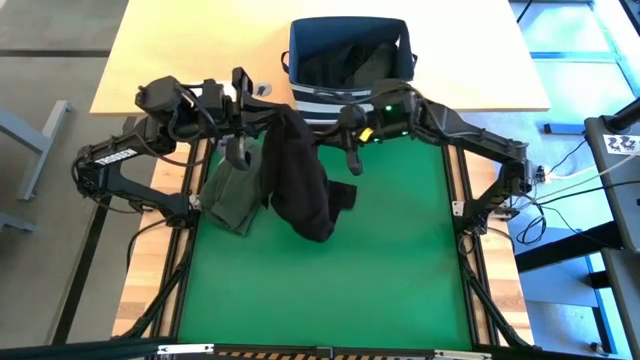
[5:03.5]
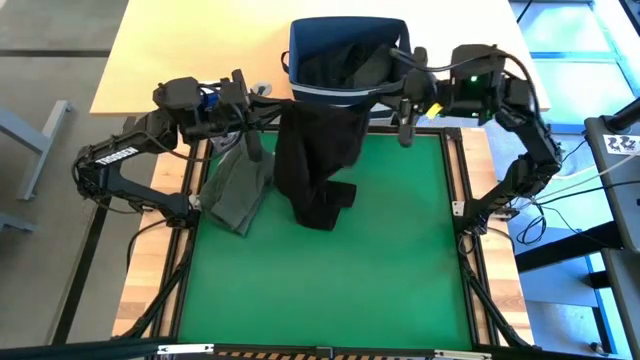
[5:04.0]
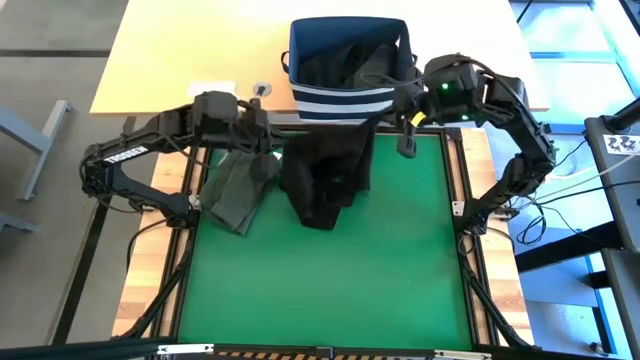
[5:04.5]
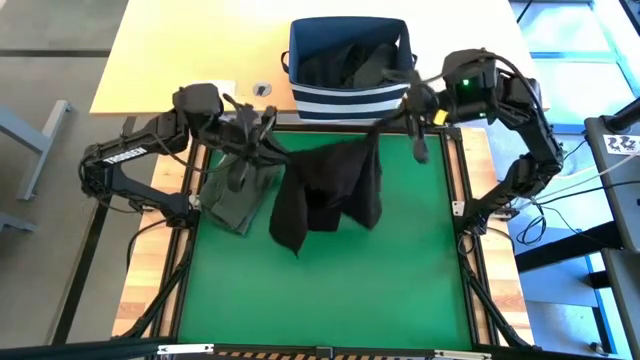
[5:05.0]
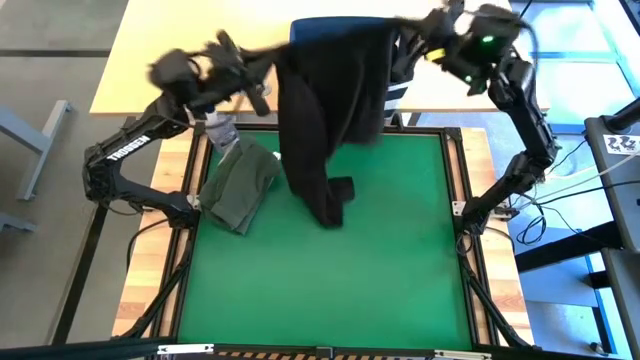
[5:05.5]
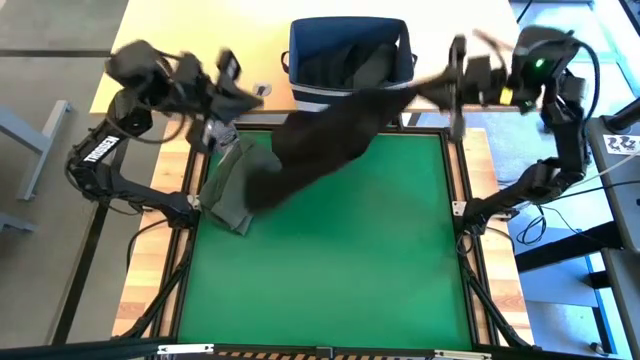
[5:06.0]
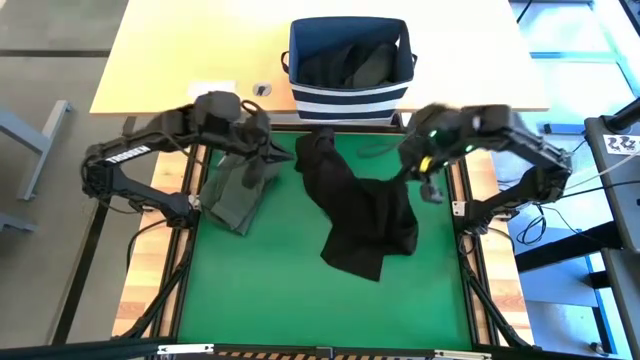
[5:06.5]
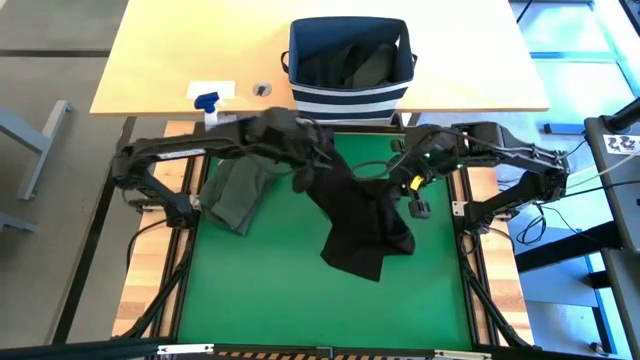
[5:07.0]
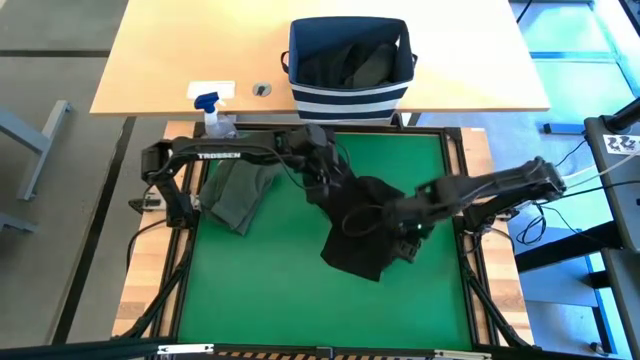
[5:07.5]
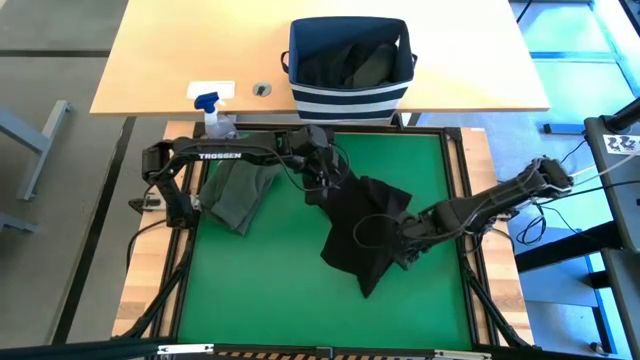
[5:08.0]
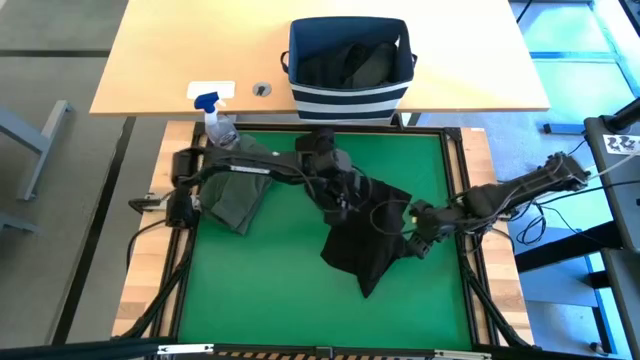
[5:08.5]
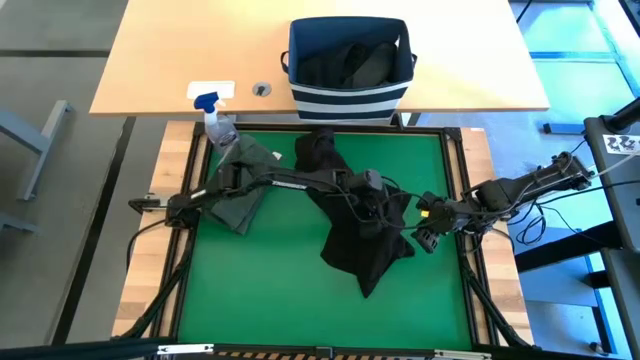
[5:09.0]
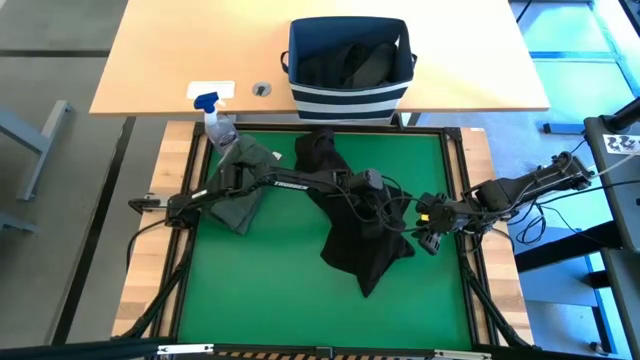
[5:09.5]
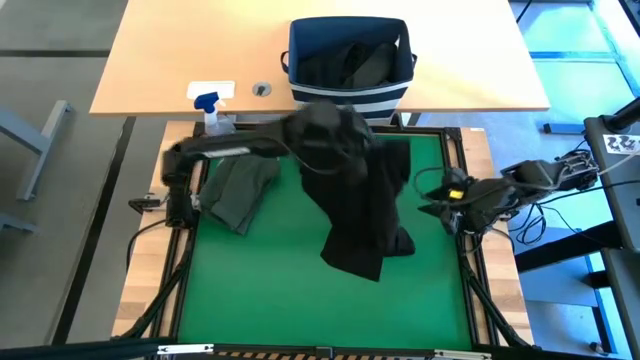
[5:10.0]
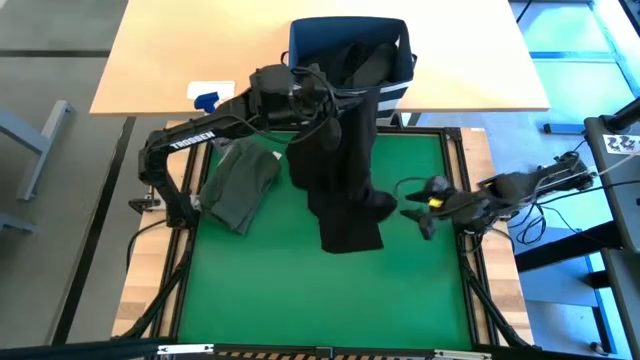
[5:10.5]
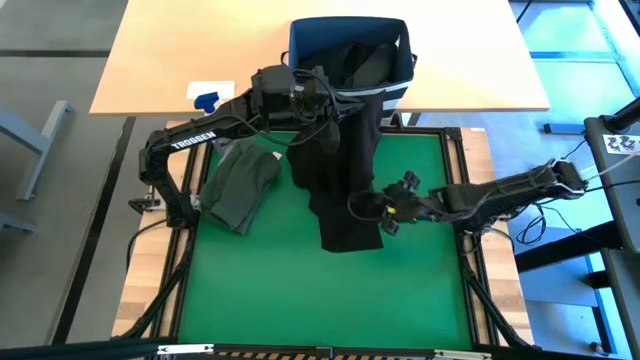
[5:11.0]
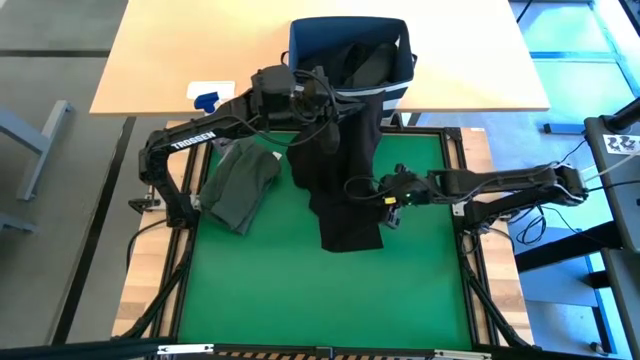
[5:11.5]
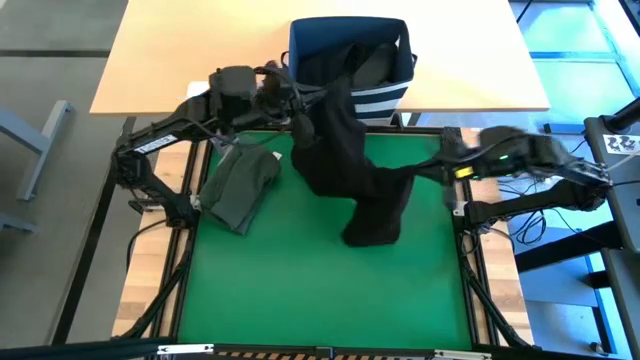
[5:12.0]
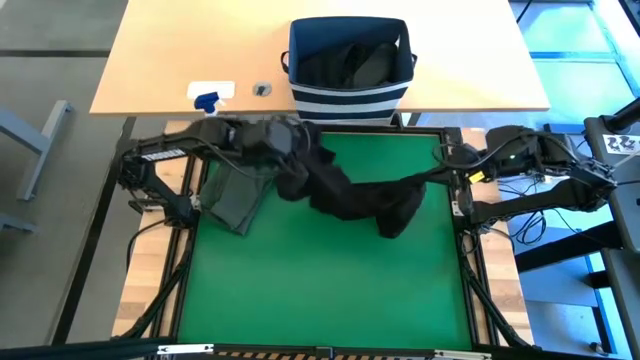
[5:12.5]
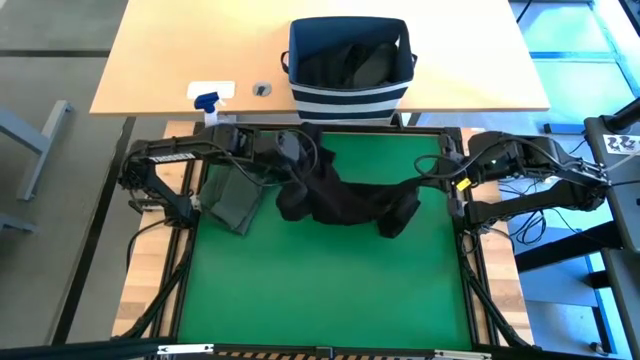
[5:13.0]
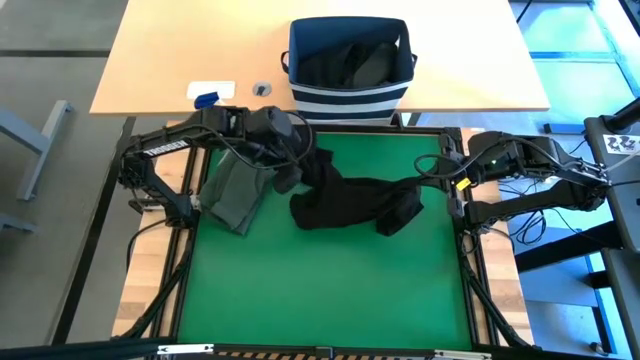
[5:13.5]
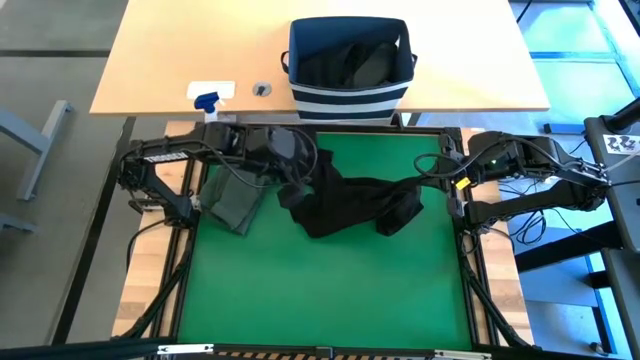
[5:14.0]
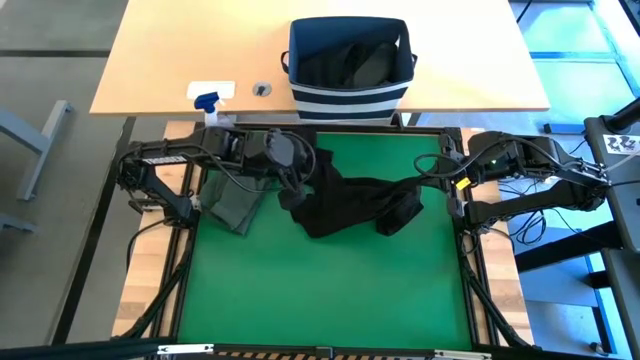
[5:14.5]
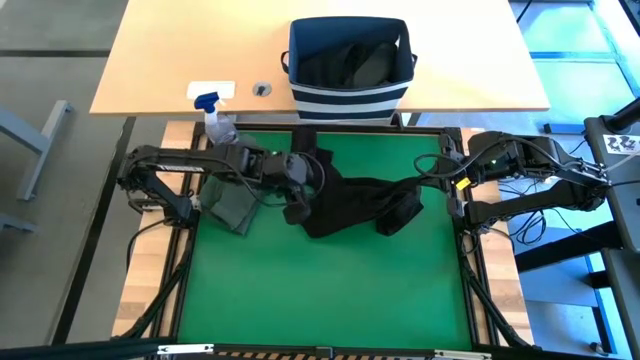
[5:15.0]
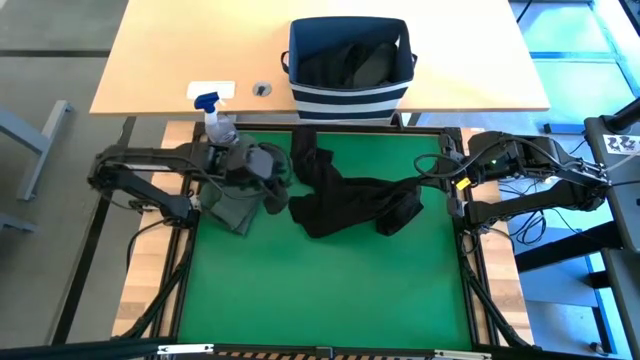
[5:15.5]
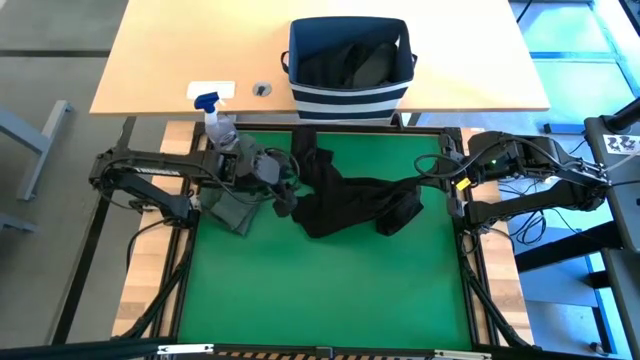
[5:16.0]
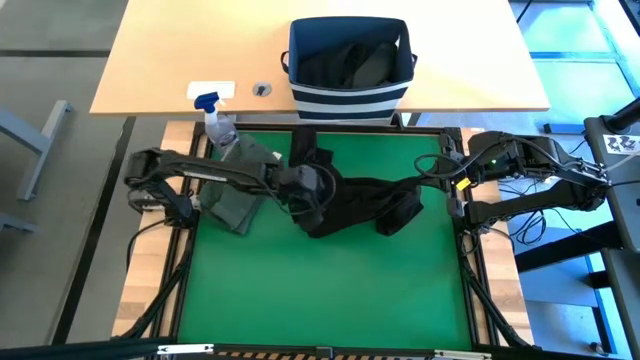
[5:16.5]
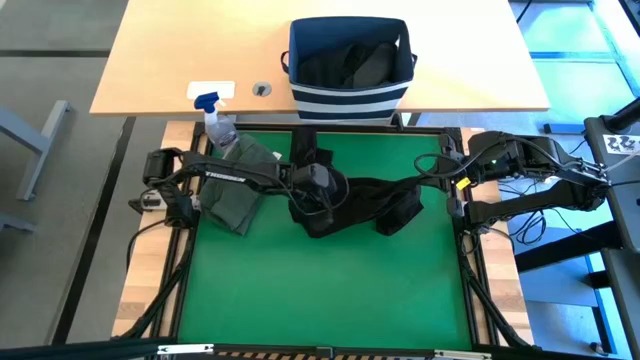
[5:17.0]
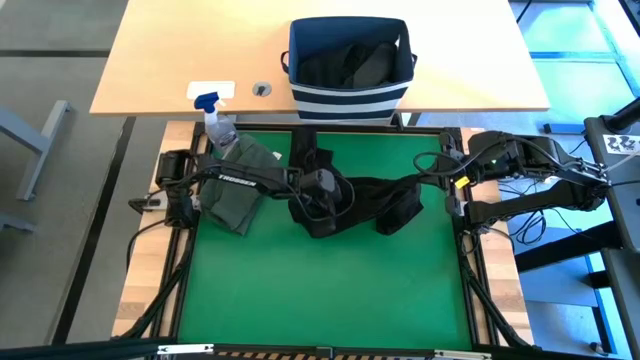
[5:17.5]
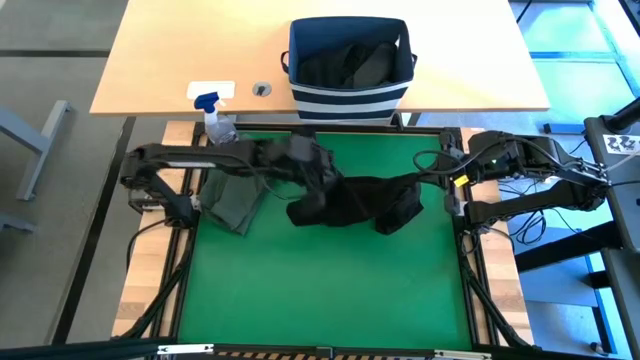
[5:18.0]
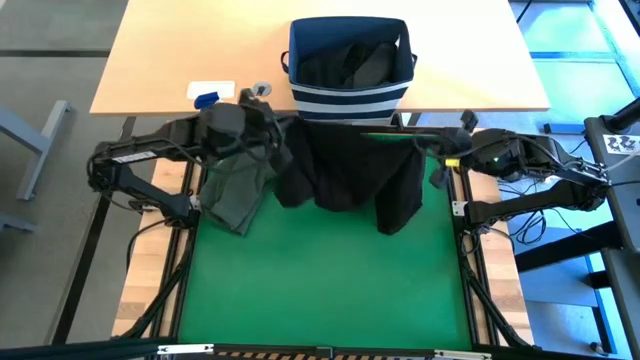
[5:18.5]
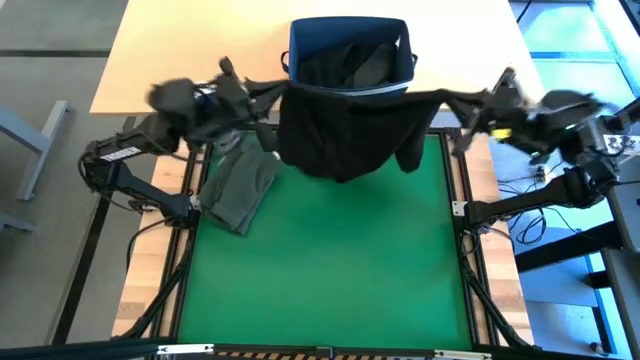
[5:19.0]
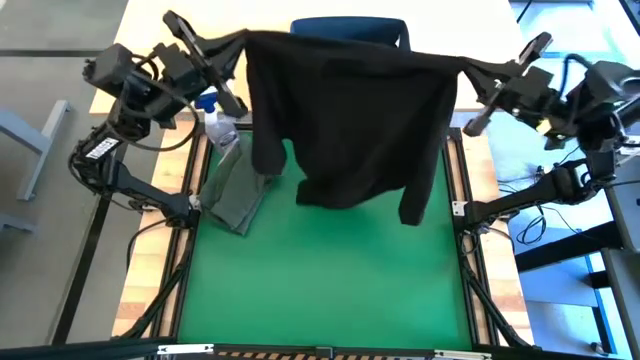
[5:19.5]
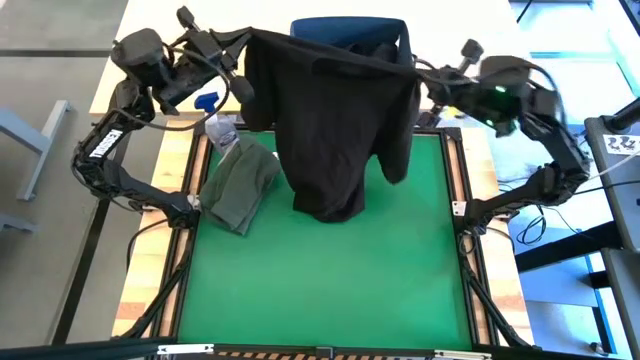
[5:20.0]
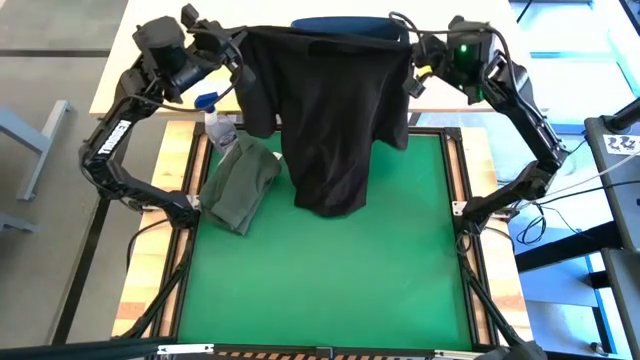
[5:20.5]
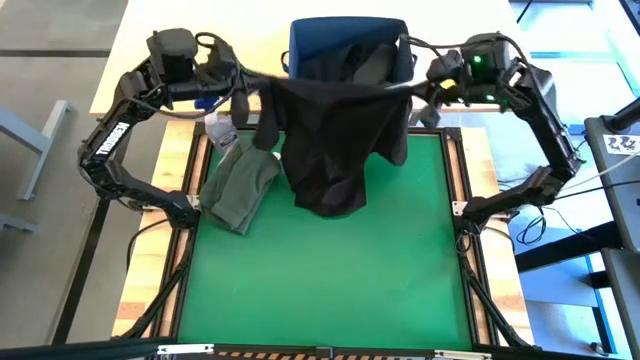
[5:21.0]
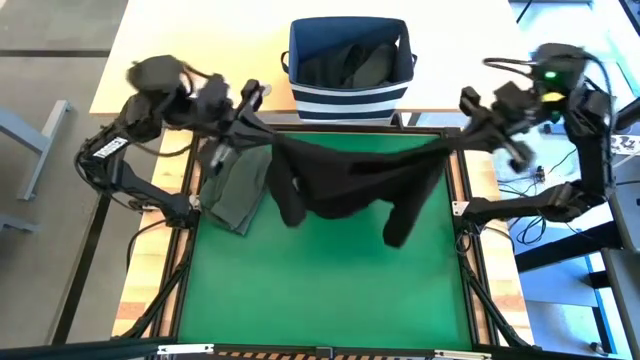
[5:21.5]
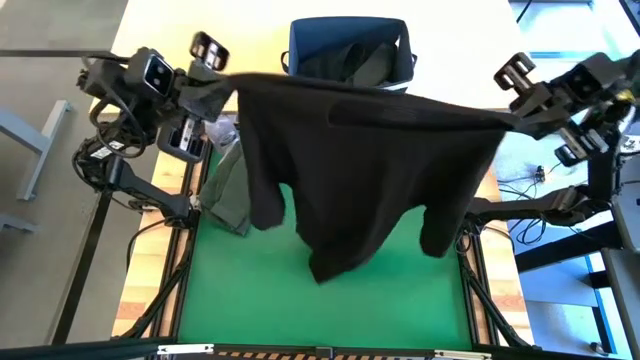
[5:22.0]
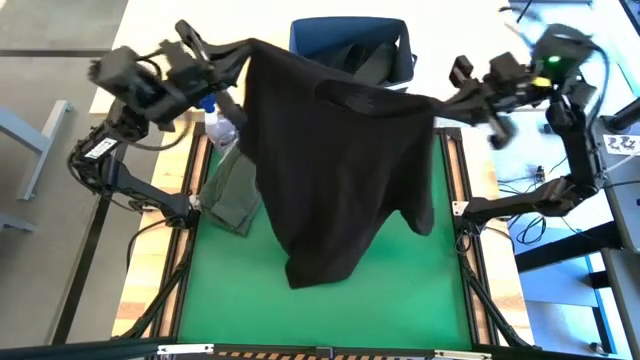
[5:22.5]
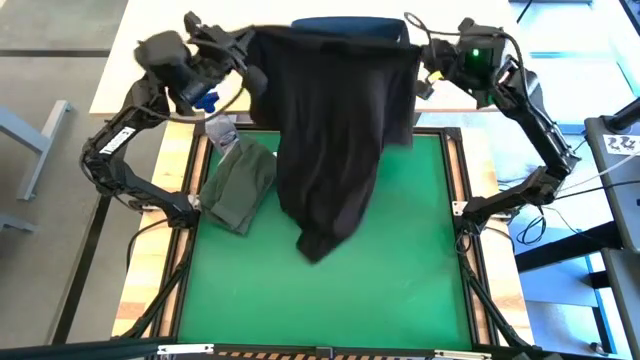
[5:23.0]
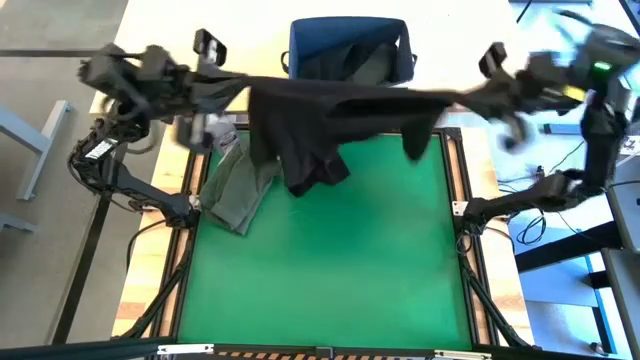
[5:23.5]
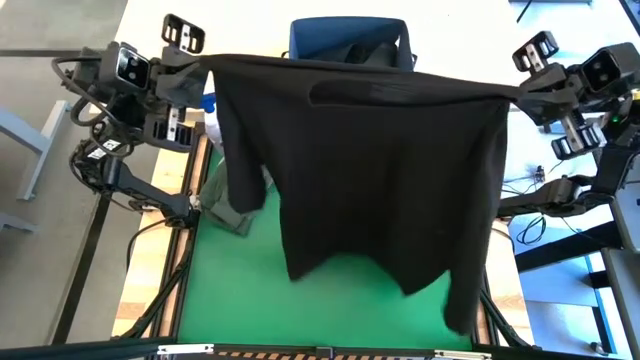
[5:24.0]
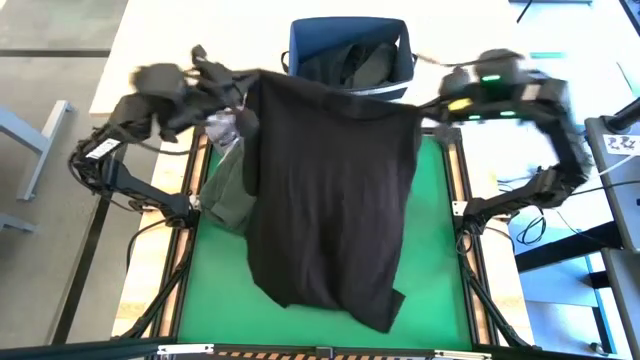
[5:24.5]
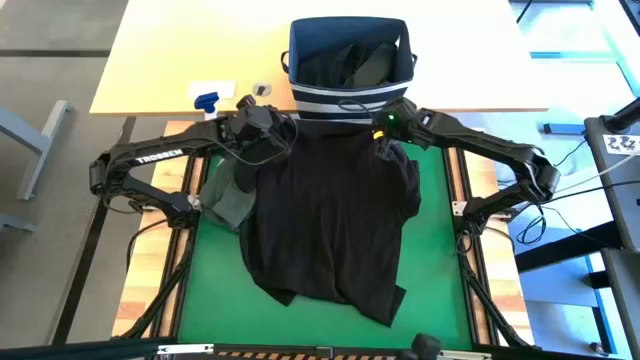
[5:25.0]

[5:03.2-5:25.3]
Task: Fold Laundry from Bin
Fold the black shirt
